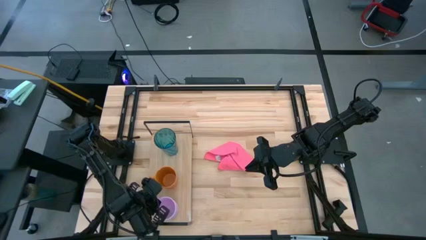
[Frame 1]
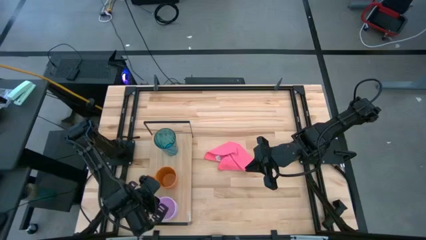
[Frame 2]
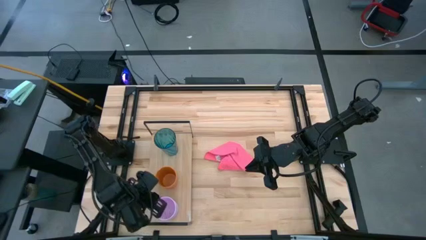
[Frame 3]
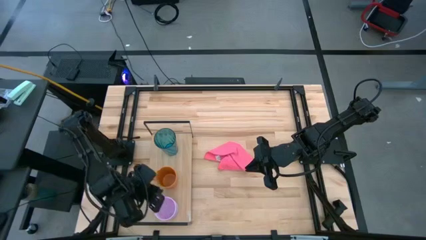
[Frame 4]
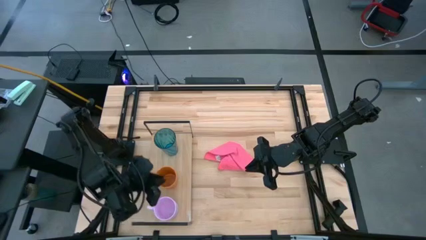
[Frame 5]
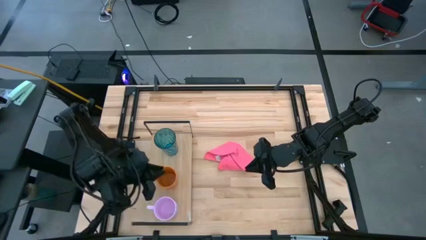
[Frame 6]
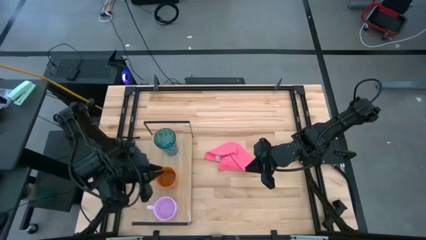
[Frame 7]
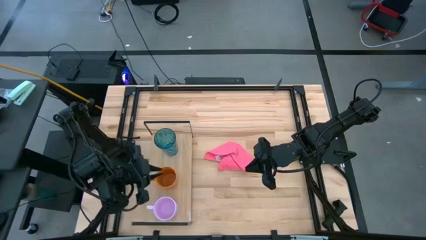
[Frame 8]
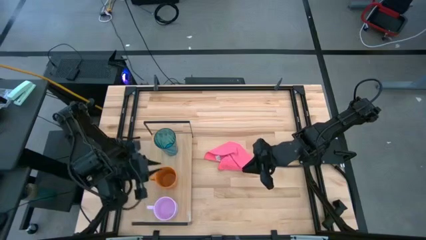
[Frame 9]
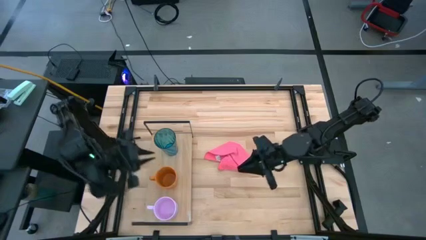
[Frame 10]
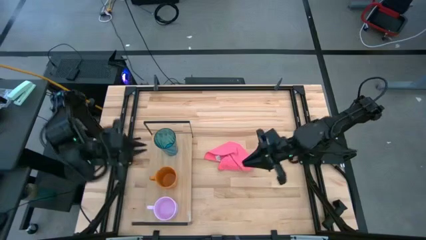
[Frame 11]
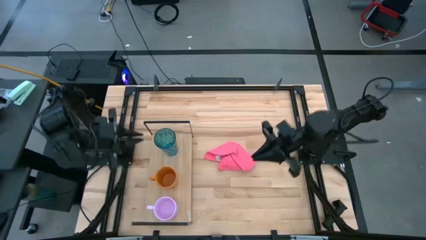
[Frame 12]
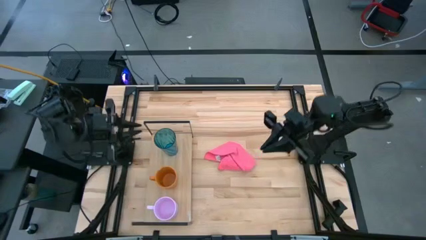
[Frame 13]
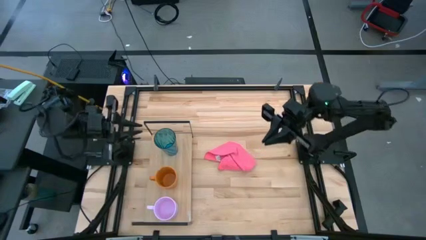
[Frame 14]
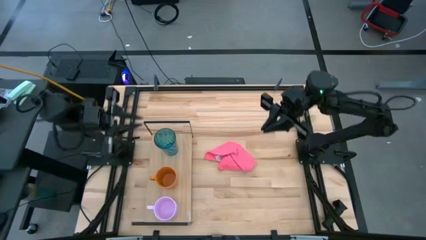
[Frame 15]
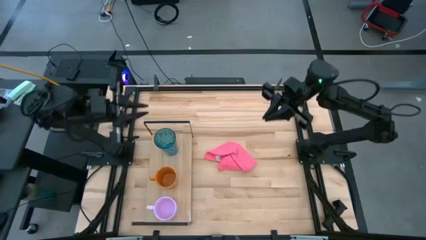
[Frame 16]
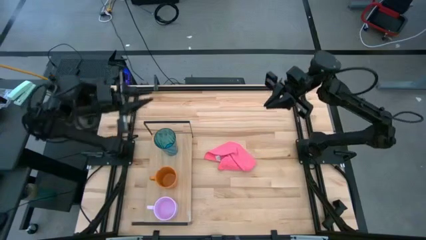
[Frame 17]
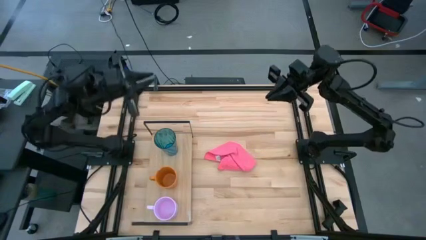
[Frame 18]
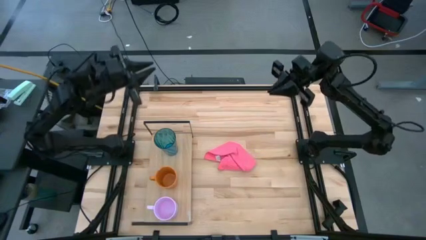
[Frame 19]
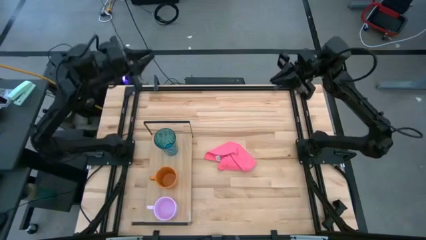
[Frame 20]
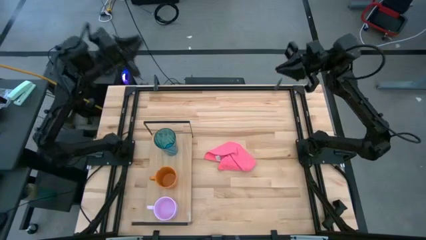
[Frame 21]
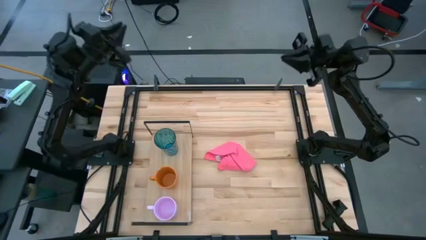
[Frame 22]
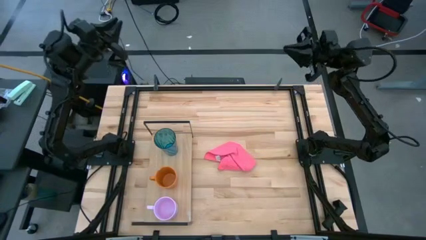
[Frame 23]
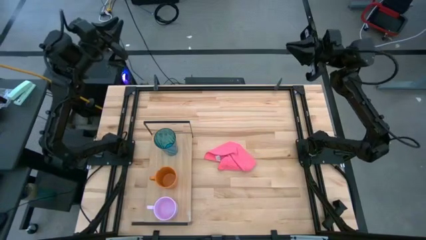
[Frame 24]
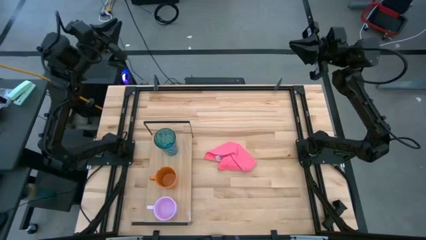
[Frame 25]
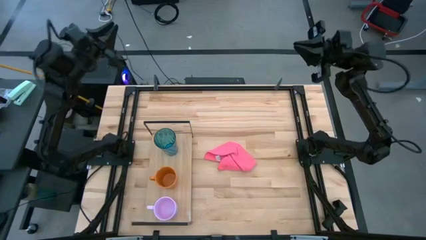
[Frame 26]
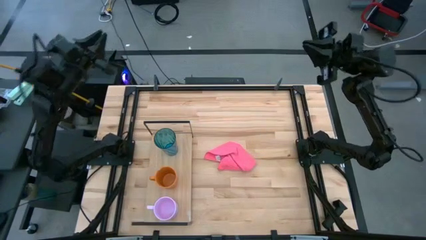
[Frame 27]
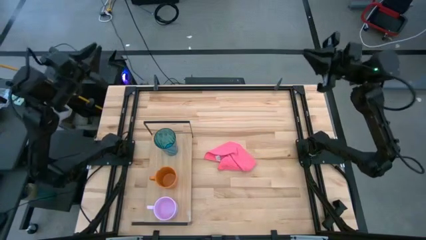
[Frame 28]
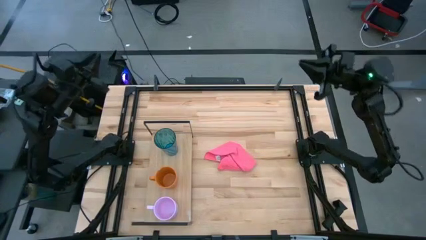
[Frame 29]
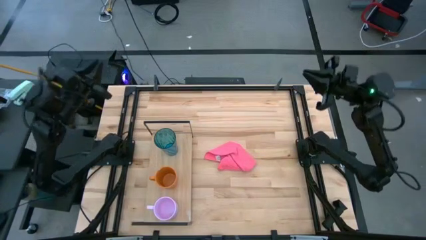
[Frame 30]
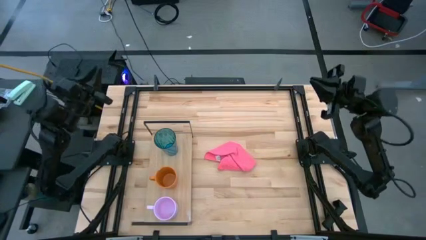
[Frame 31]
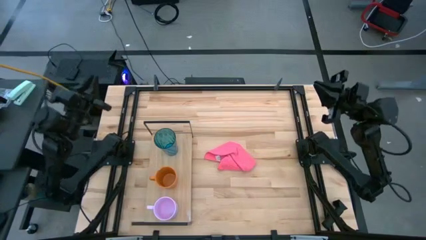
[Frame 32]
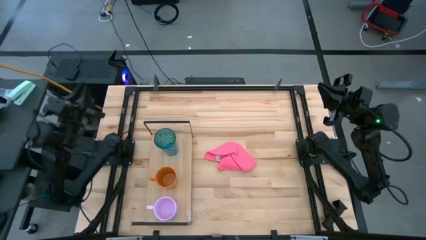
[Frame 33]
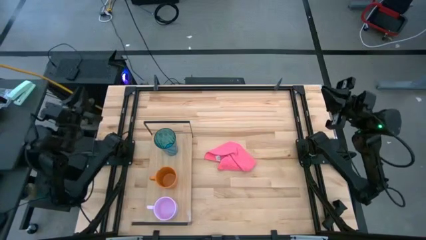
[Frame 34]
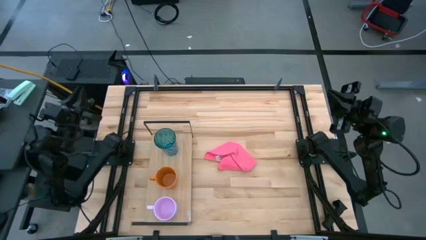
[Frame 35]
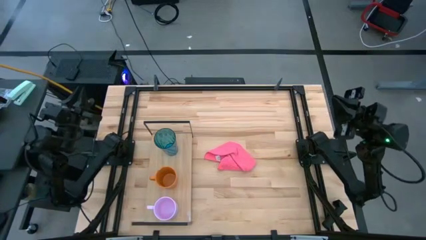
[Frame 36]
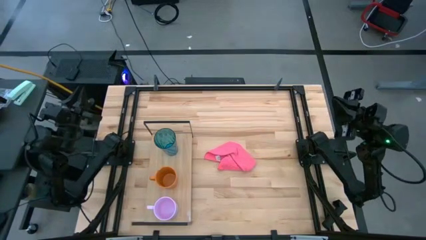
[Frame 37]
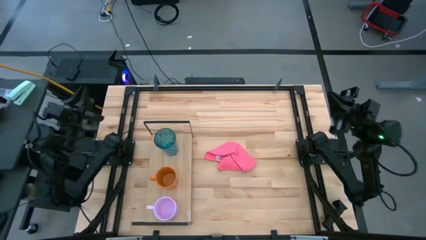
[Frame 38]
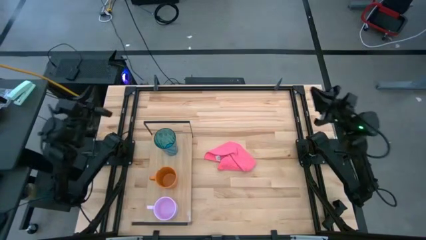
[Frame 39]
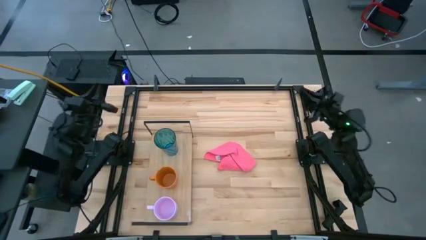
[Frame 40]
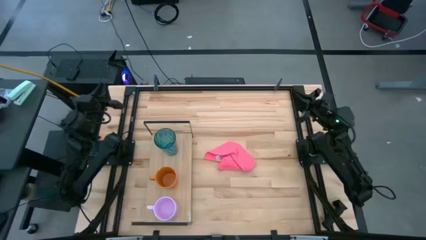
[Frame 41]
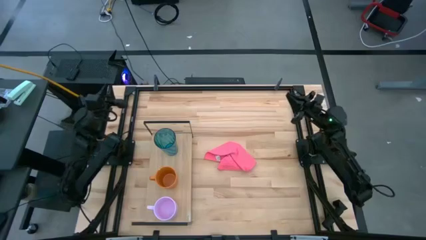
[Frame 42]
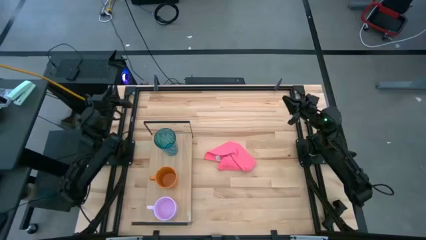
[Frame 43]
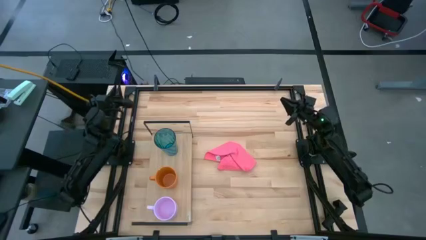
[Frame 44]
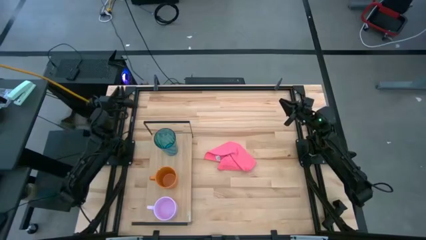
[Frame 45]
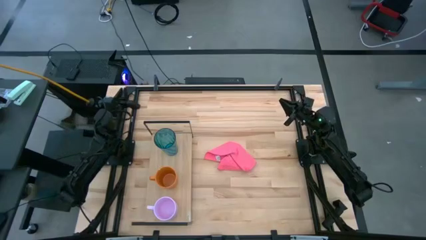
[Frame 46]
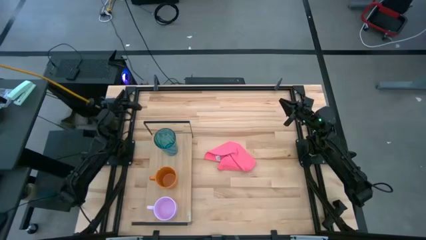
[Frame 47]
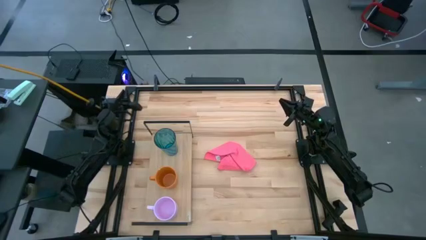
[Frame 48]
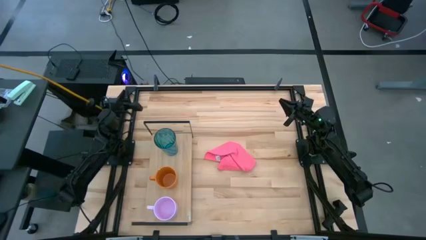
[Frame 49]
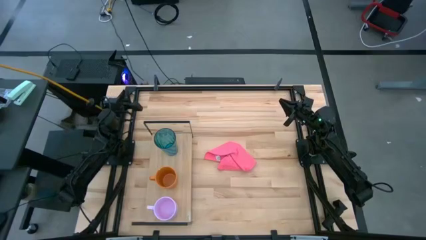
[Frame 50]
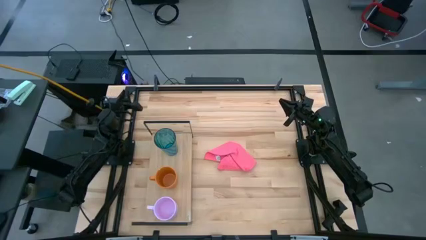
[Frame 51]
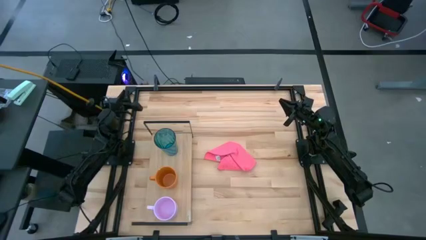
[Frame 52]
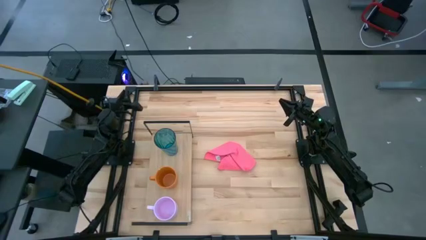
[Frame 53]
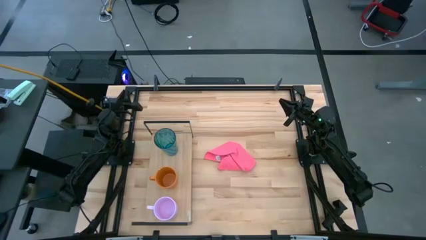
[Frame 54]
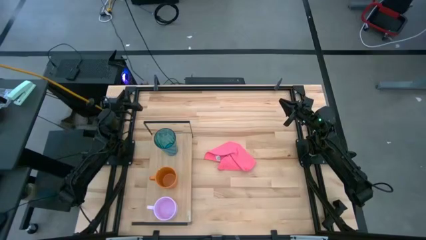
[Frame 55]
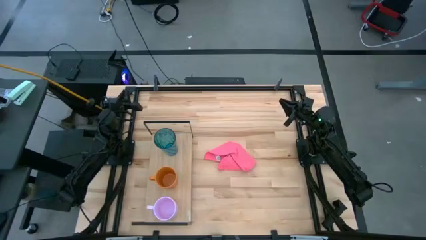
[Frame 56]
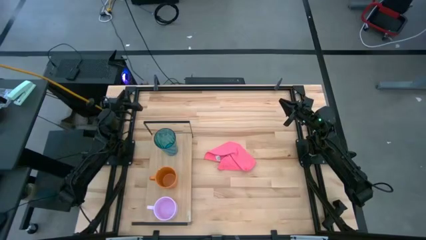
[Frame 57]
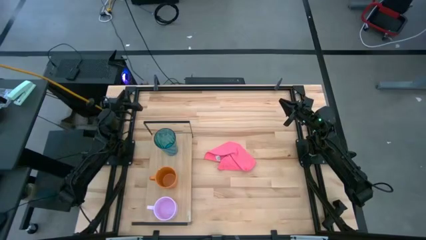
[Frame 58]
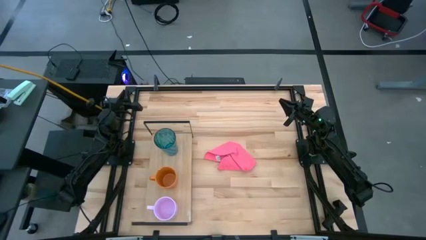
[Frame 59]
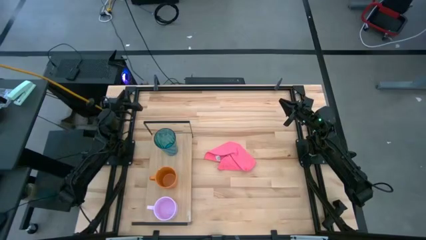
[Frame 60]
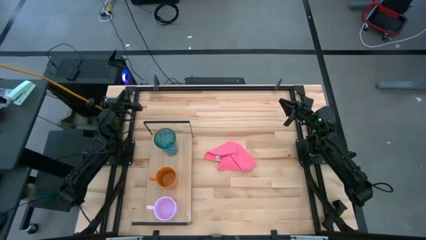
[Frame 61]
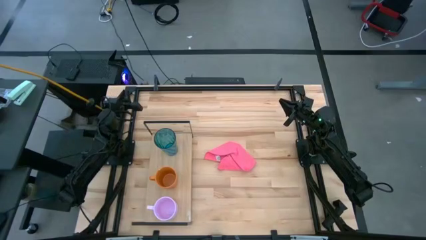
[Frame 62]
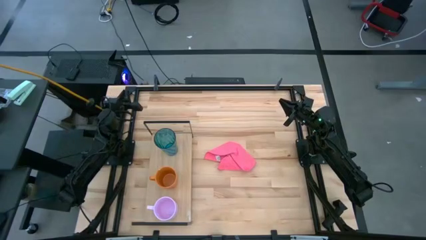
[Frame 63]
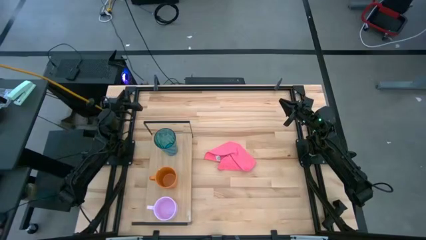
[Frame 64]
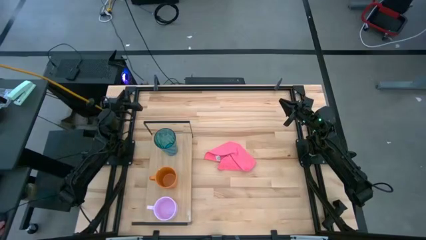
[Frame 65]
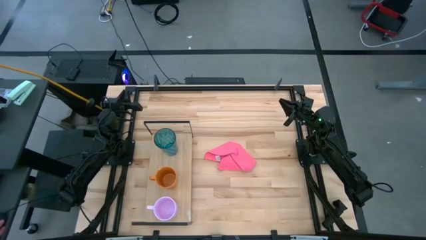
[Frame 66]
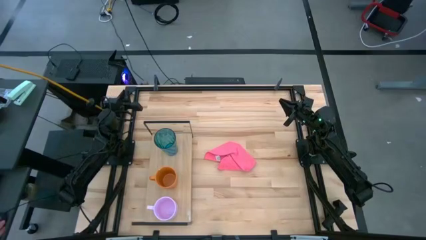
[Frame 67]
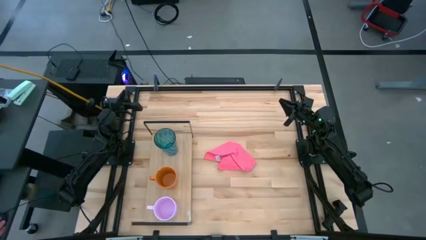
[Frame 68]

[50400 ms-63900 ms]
Task: Stack small to large cups/mugs on shelf
Return to Home Position
